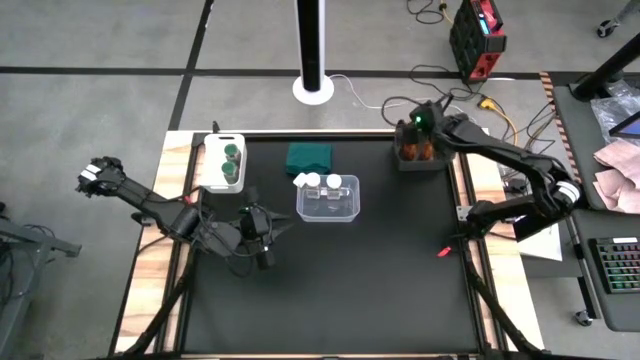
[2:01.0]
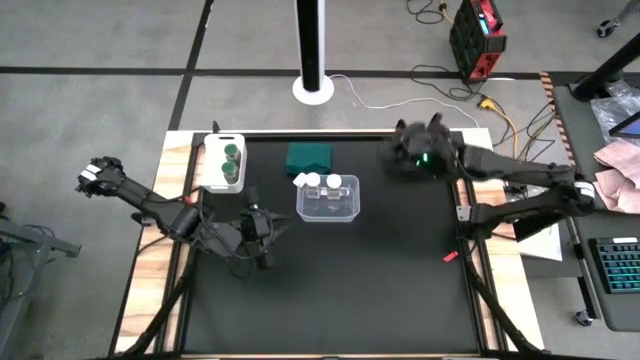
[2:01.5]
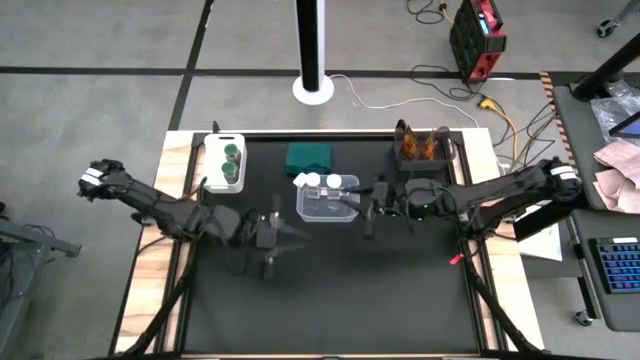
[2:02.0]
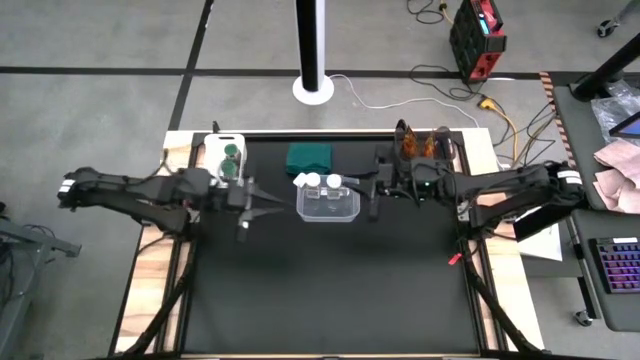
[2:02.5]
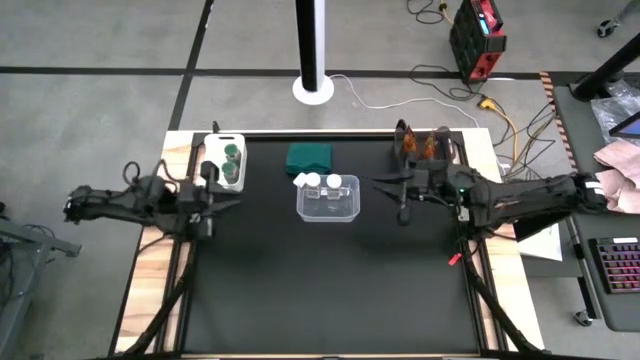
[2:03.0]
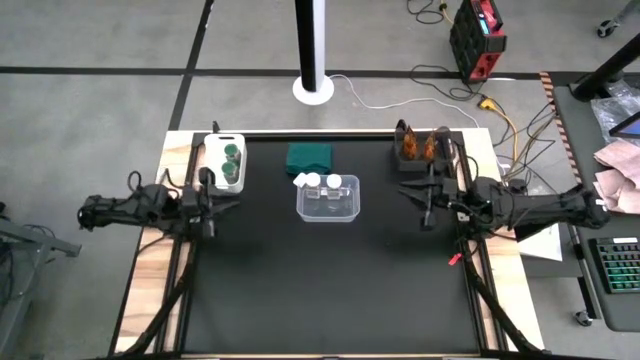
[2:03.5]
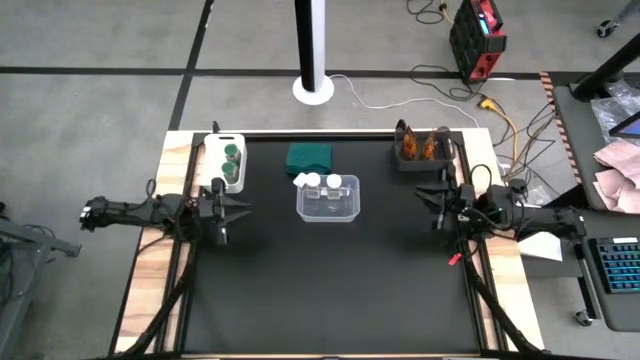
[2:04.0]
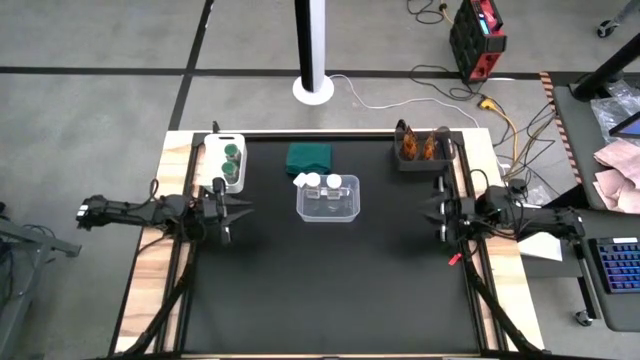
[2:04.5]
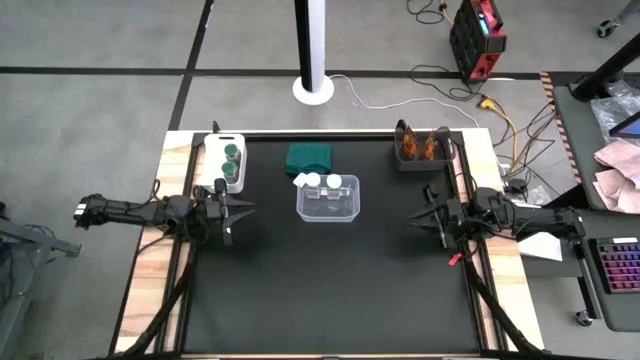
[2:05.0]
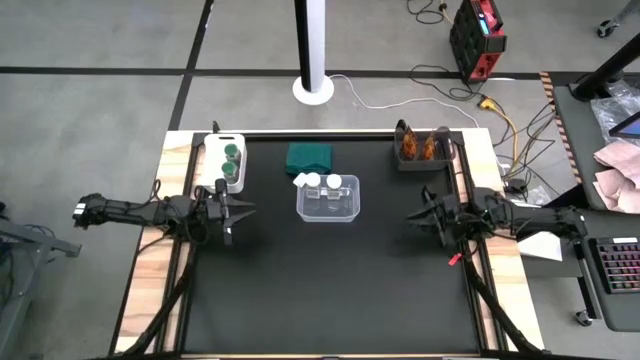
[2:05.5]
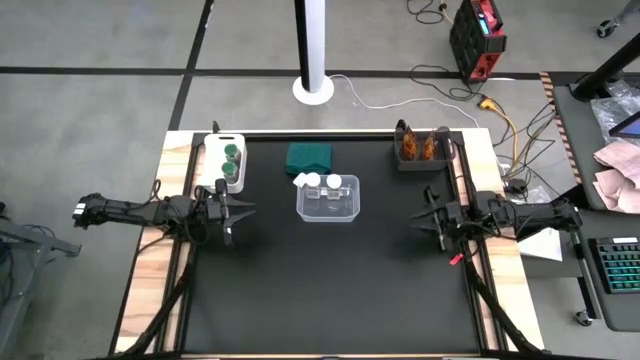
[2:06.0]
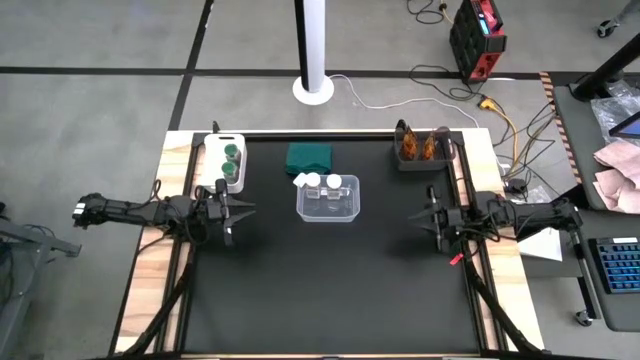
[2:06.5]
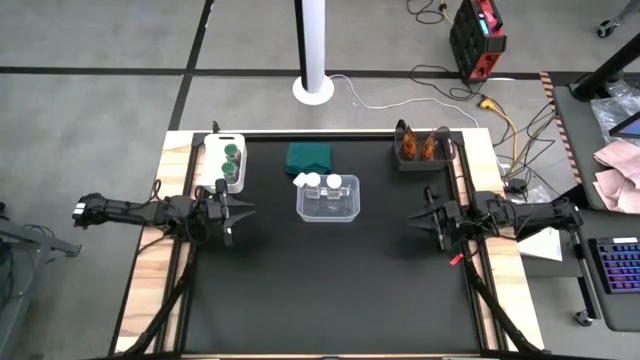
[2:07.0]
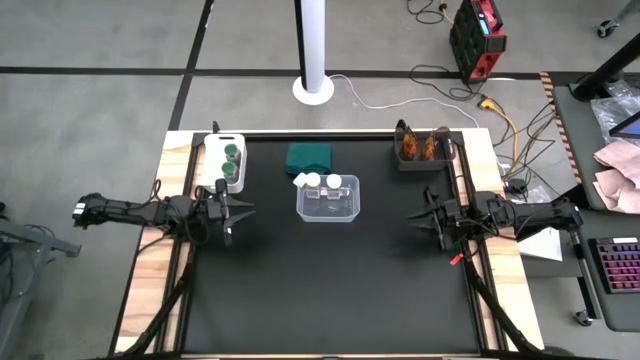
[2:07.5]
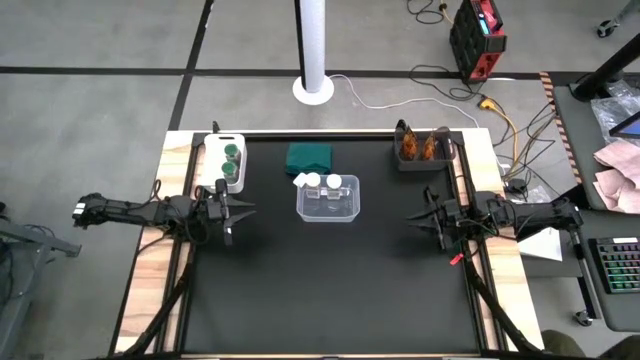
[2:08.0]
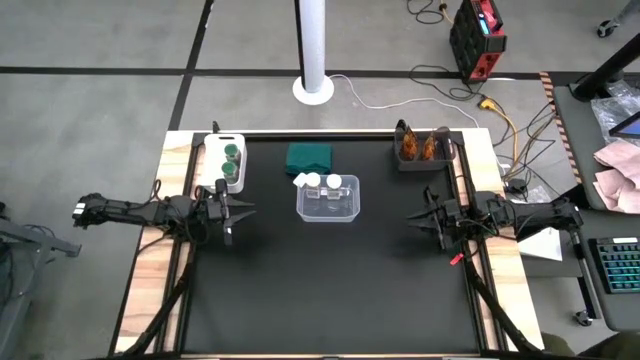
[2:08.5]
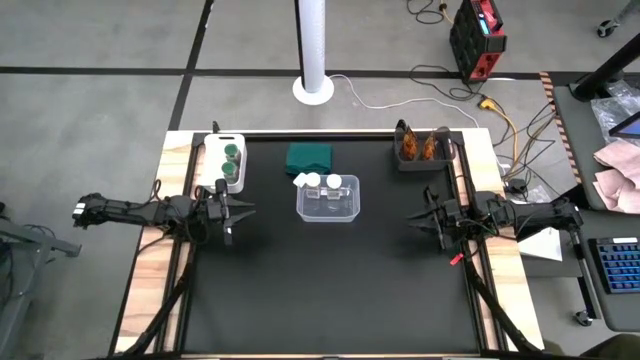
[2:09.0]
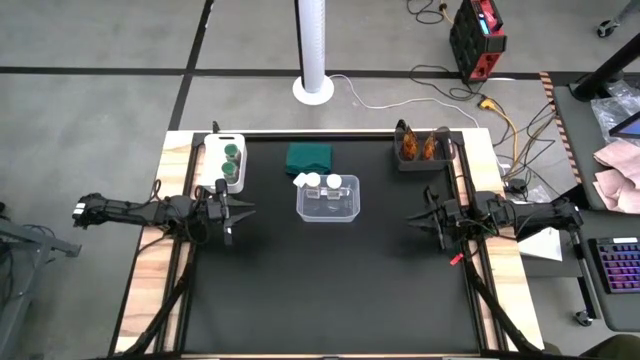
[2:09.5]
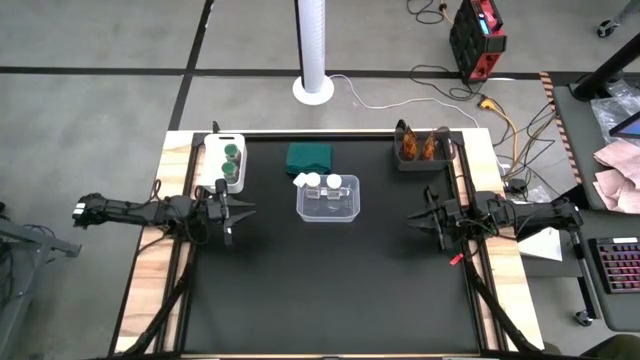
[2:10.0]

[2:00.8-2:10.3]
Task: Sort spices by type
Return to Home Position

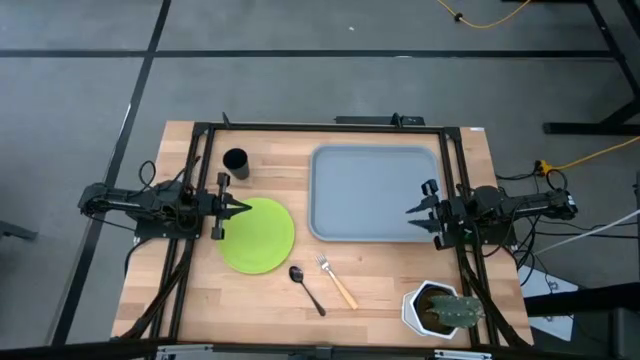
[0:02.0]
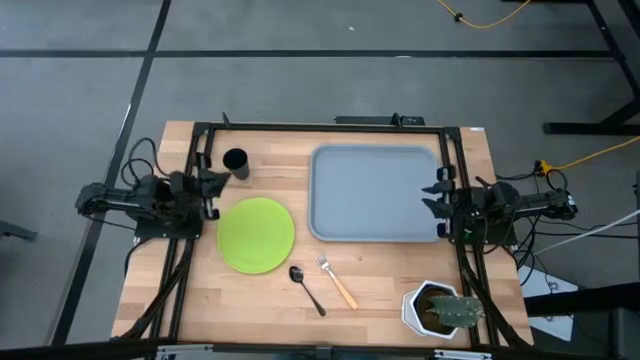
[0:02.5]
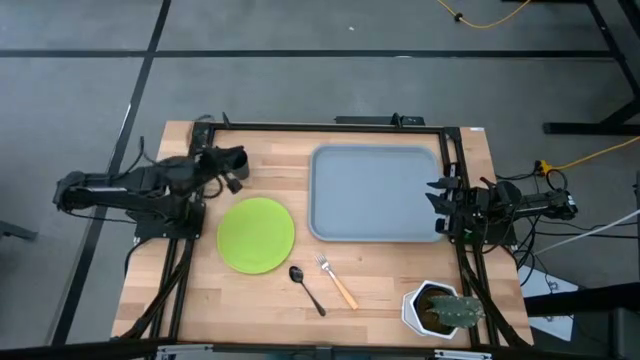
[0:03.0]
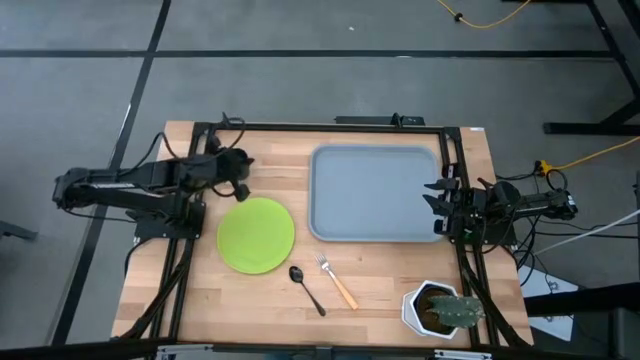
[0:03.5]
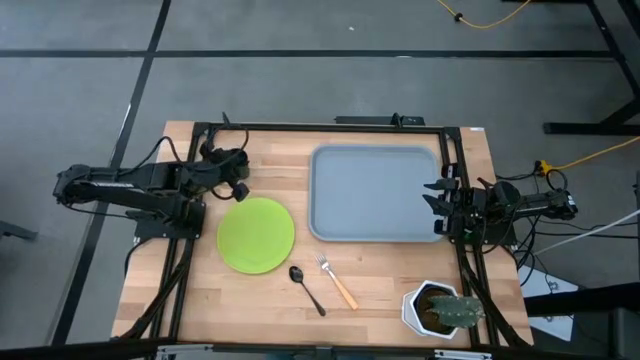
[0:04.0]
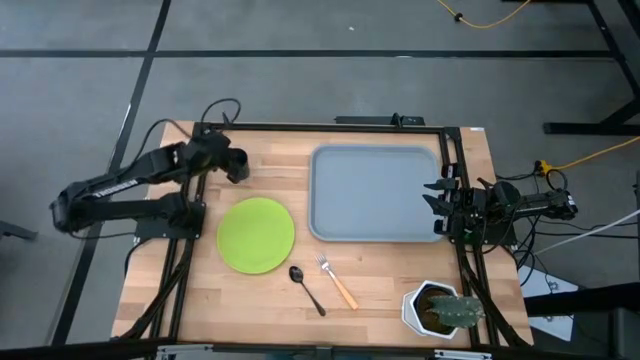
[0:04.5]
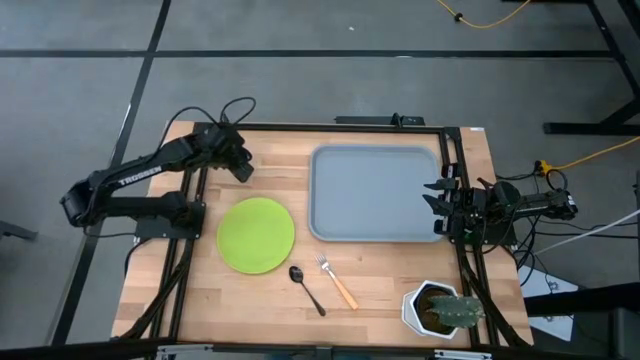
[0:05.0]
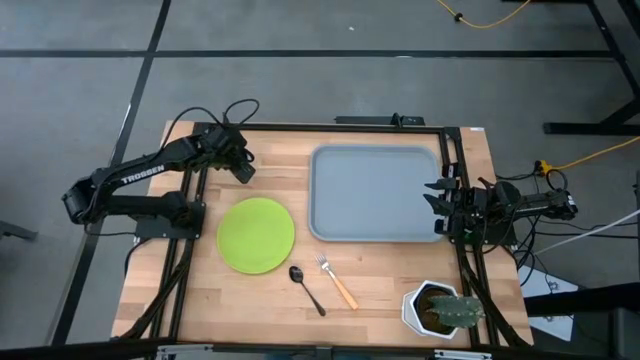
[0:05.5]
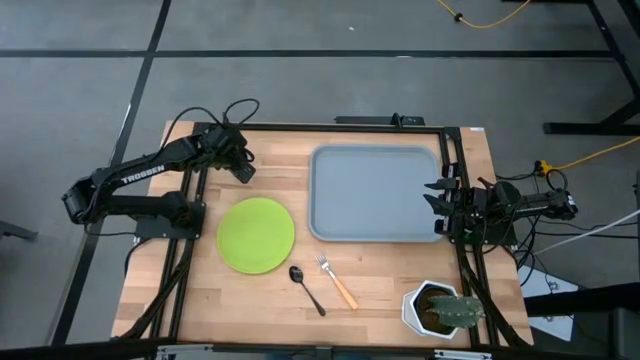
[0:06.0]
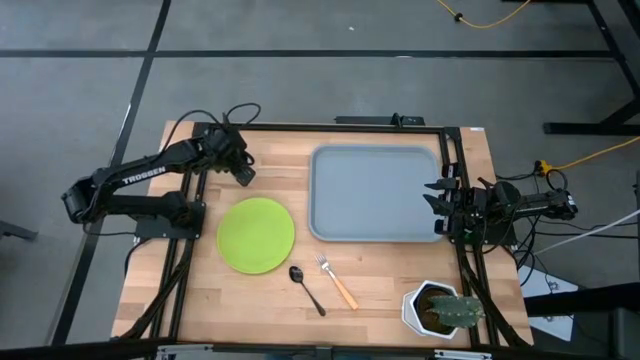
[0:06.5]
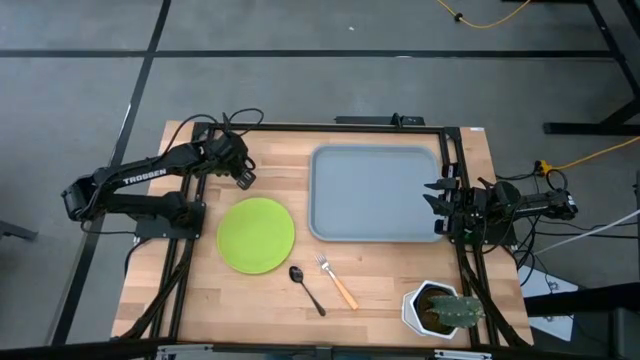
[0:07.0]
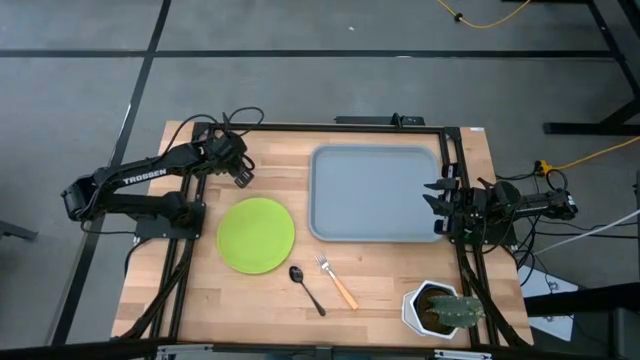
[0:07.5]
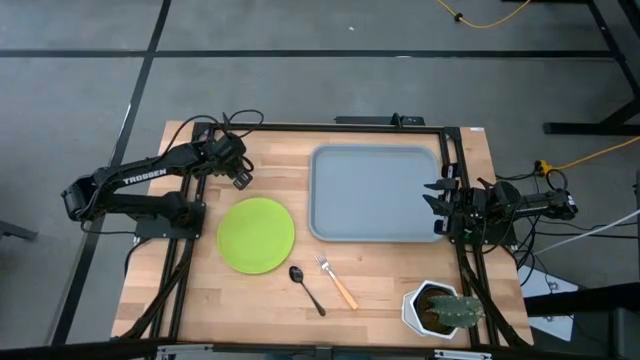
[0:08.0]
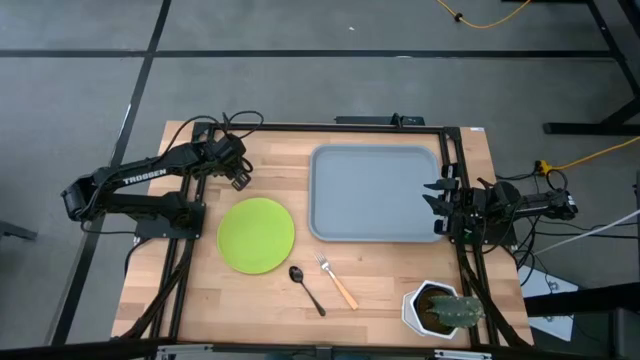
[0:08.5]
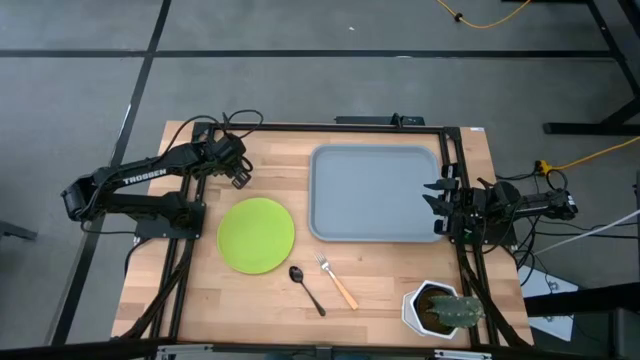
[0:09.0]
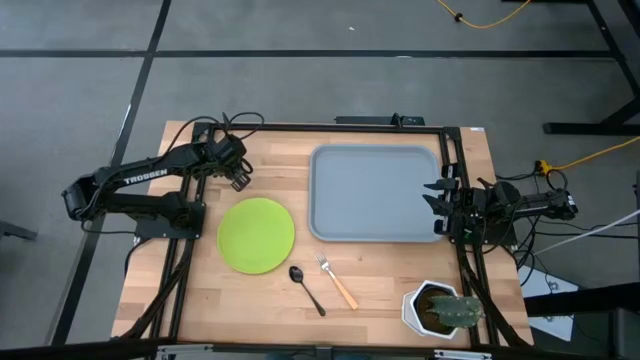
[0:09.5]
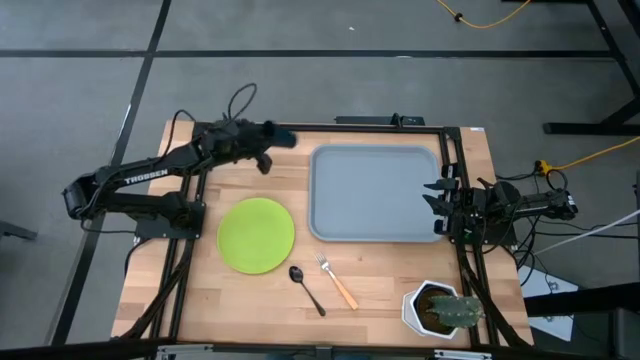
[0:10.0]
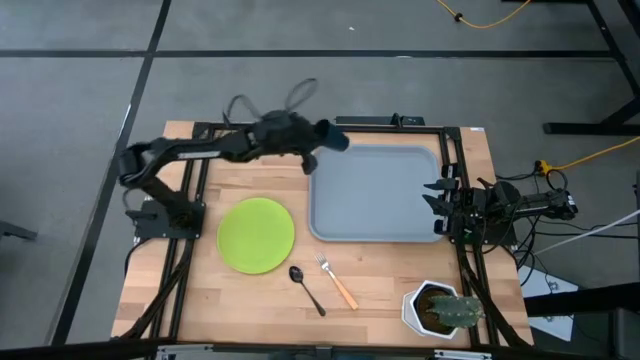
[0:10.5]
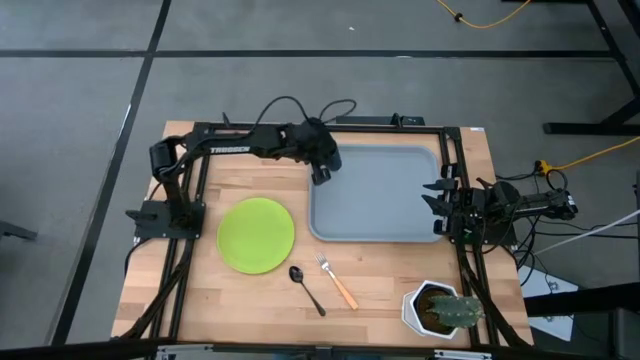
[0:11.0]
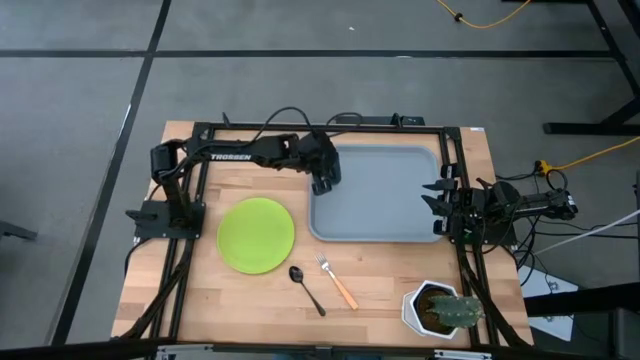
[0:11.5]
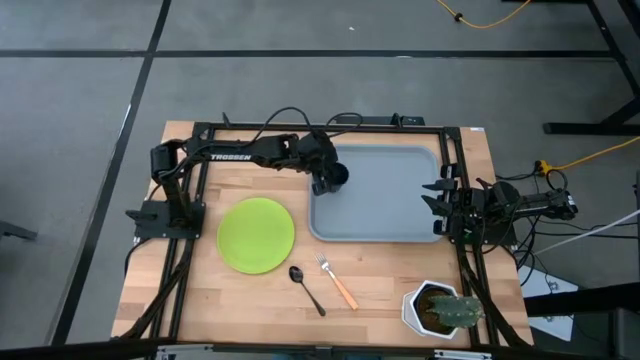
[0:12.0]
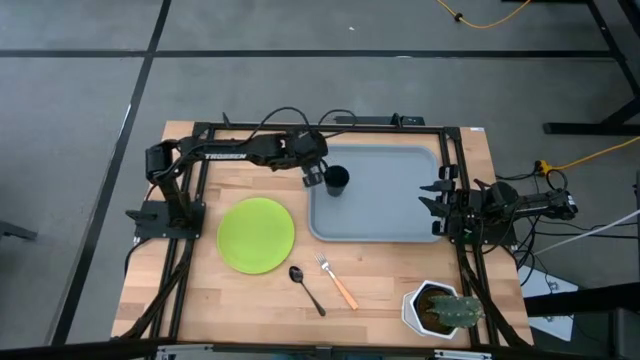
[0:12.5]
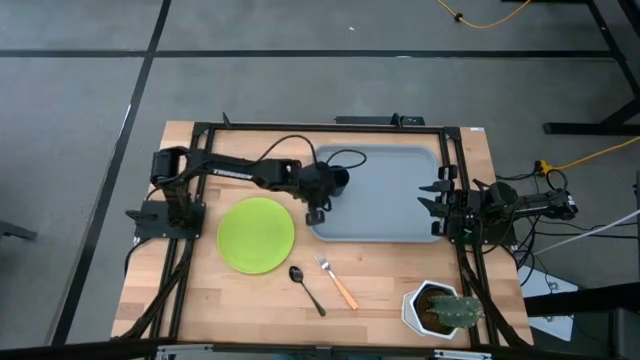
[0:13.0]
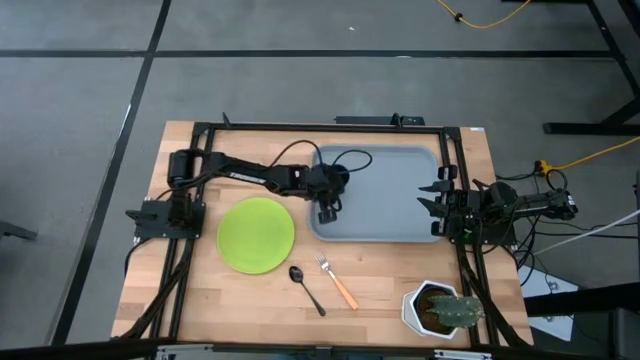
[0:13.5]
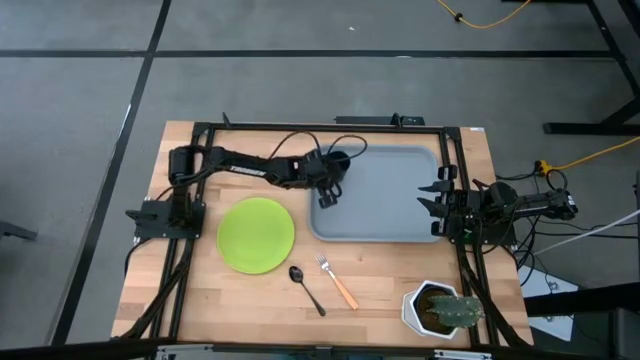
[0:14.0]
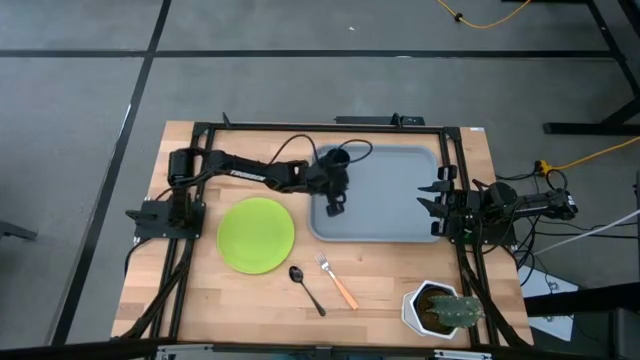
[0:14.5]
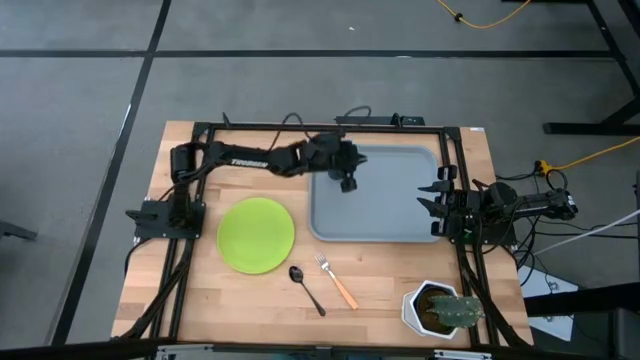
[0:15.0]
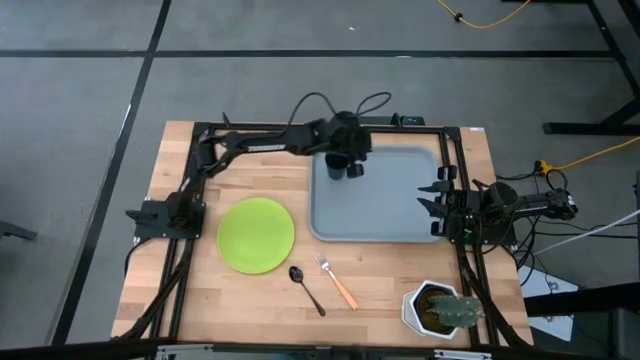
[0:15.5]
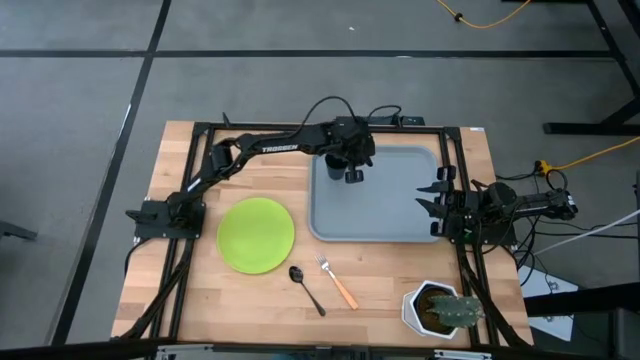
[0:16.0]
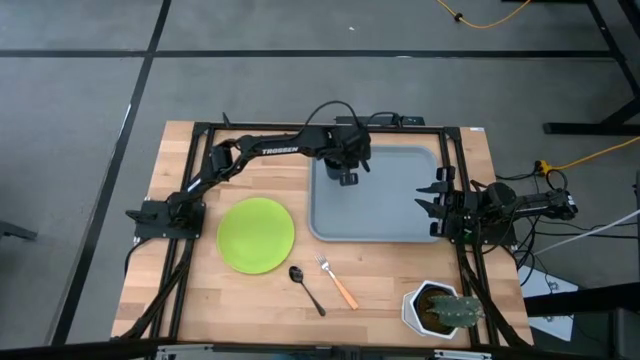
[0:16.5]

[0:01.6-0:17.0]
Task: Pick and place plate/cup/fork/spoon on tray
Put the black cup on the gray serving tray
